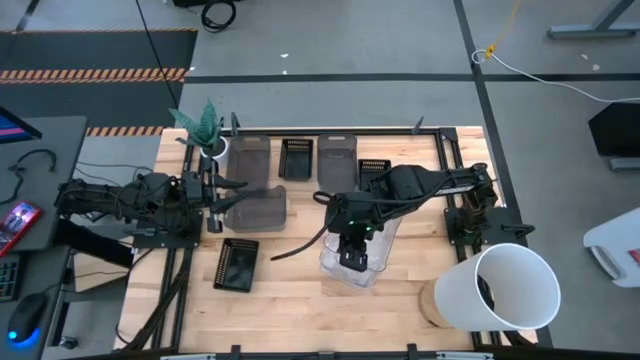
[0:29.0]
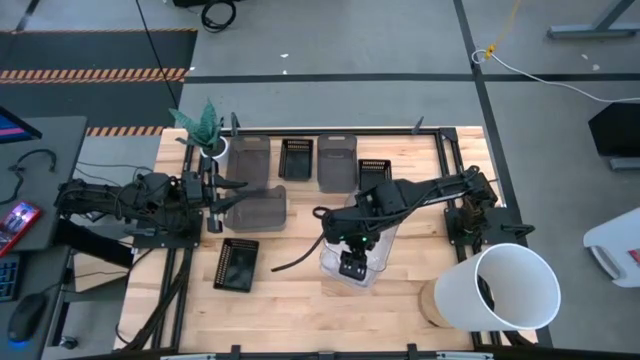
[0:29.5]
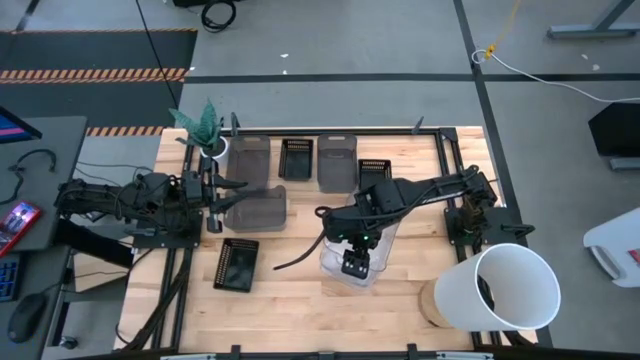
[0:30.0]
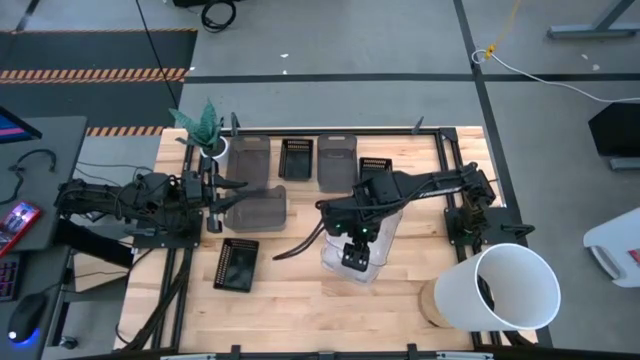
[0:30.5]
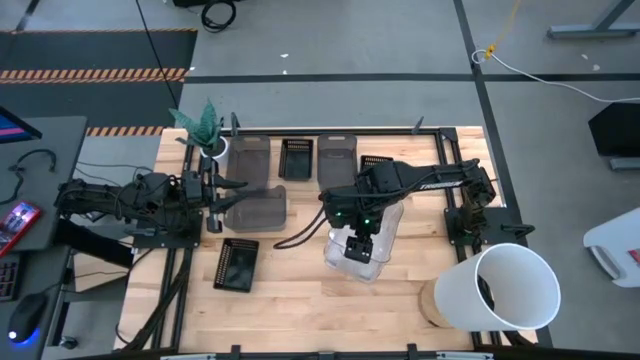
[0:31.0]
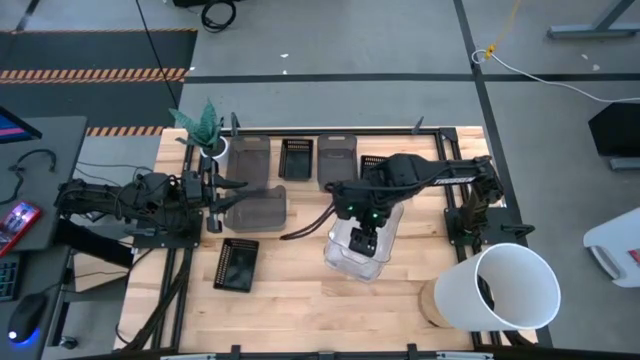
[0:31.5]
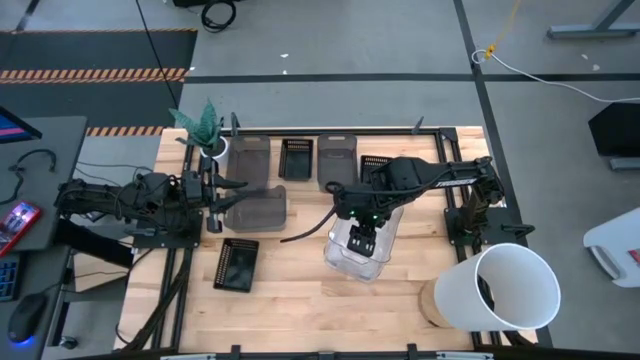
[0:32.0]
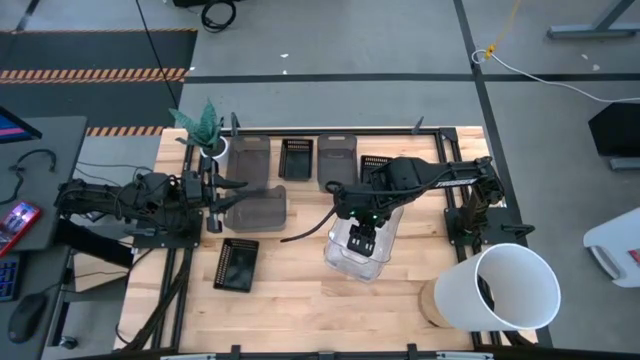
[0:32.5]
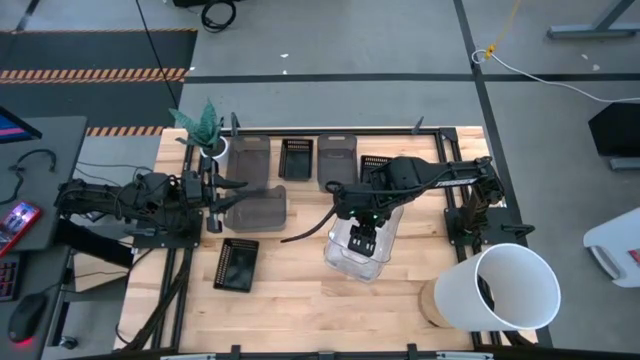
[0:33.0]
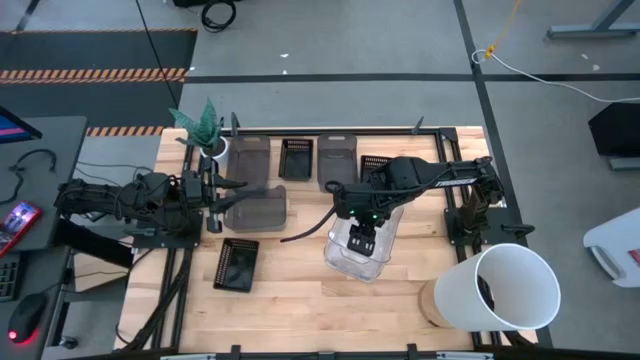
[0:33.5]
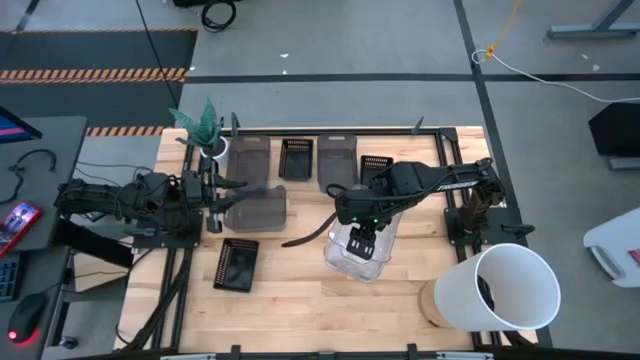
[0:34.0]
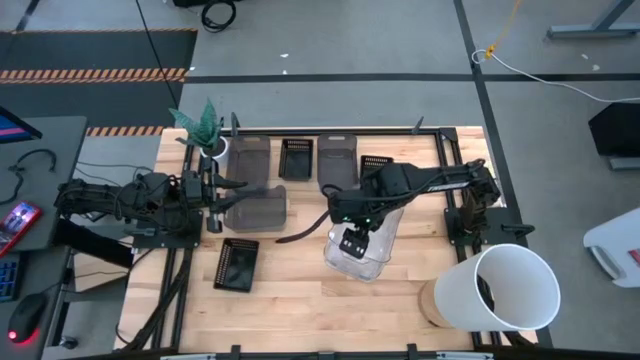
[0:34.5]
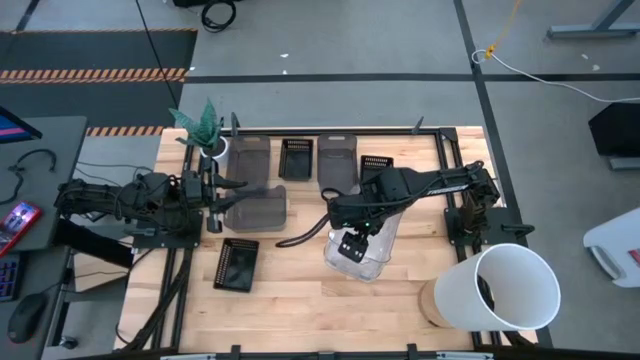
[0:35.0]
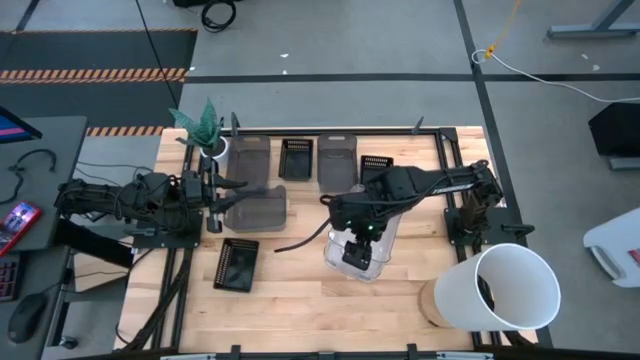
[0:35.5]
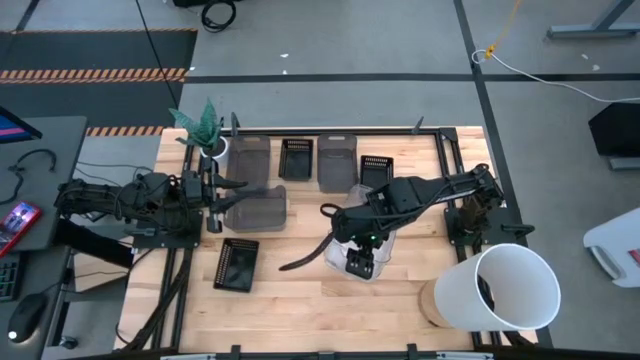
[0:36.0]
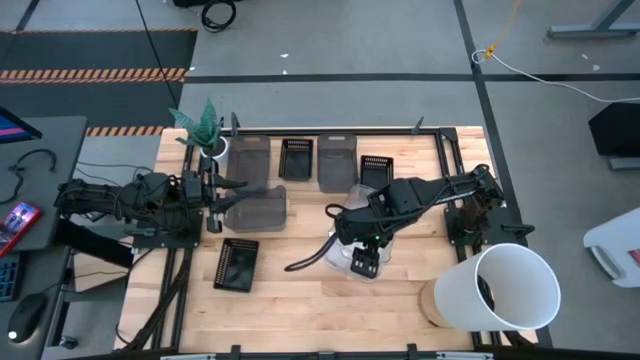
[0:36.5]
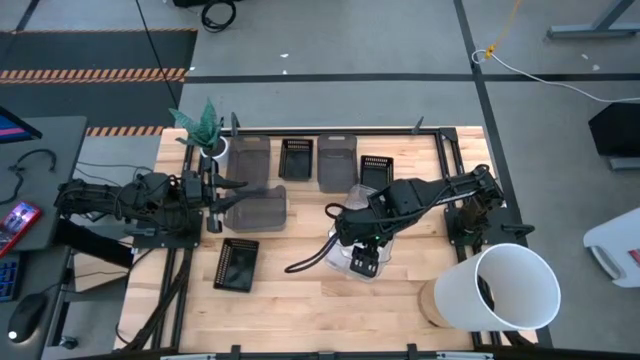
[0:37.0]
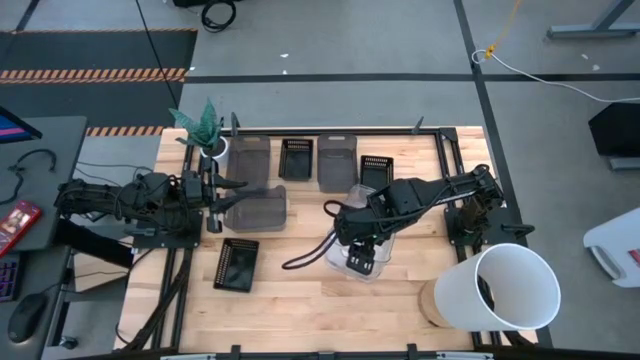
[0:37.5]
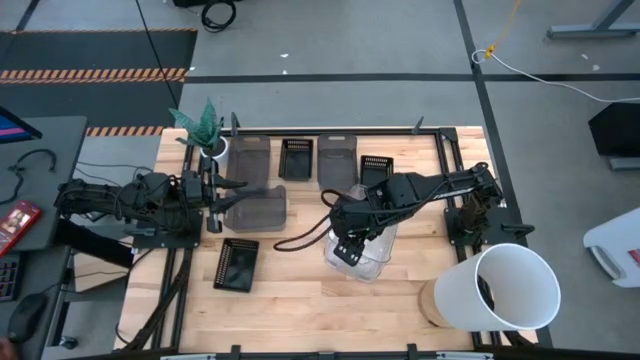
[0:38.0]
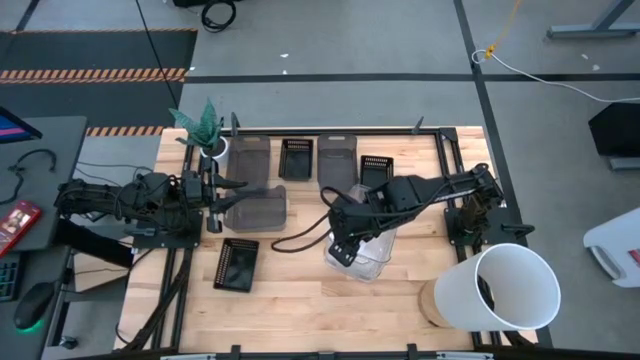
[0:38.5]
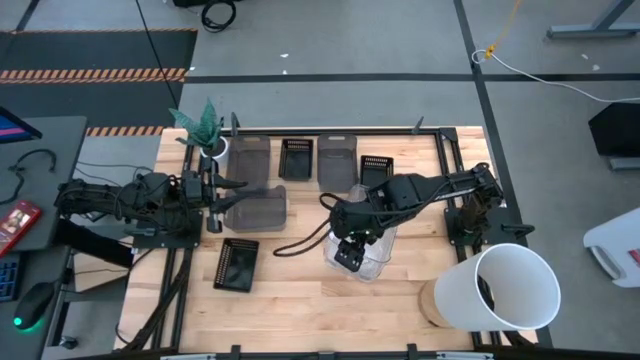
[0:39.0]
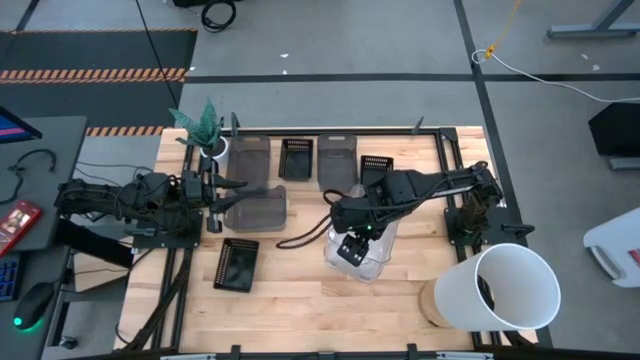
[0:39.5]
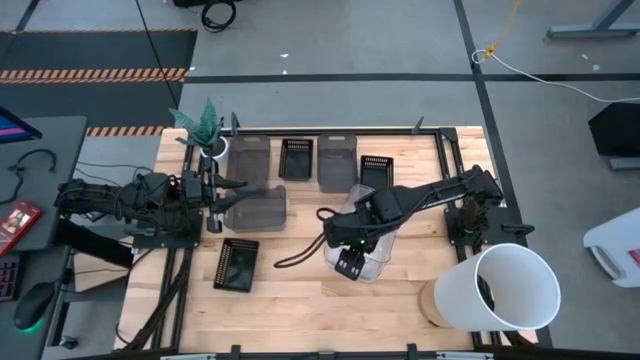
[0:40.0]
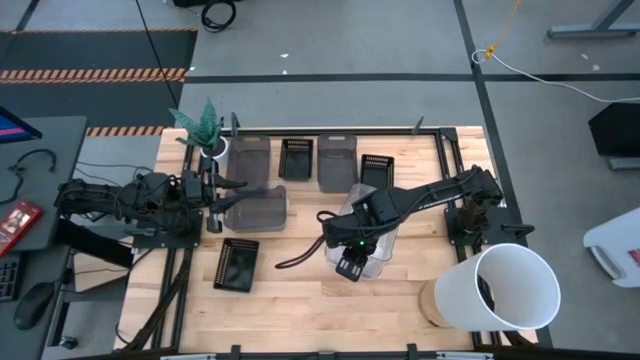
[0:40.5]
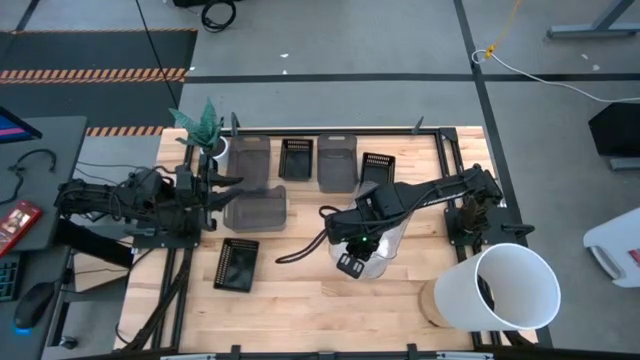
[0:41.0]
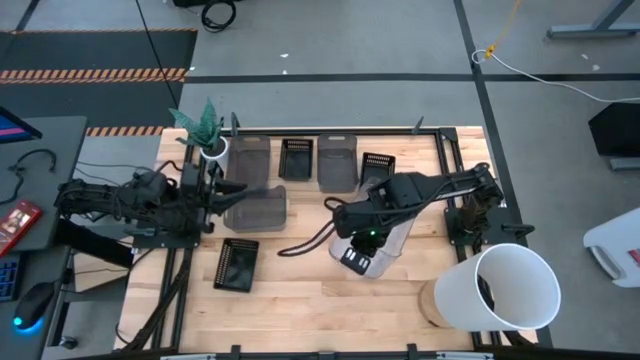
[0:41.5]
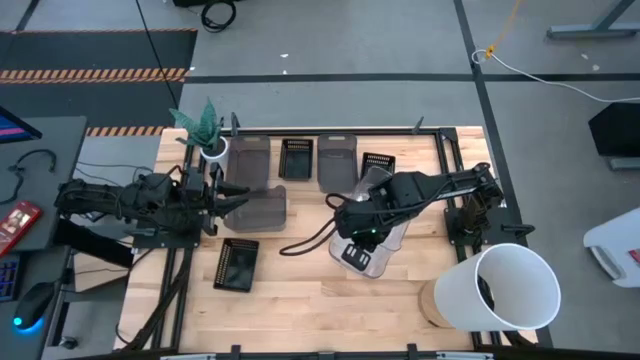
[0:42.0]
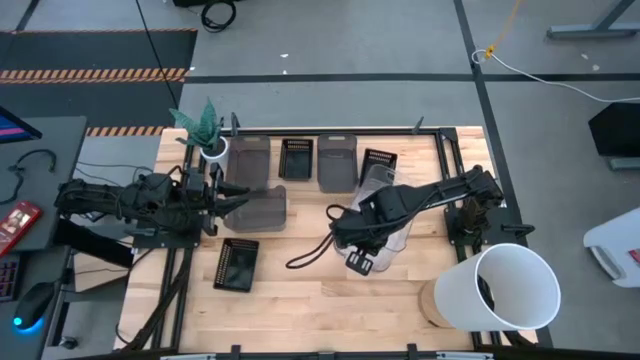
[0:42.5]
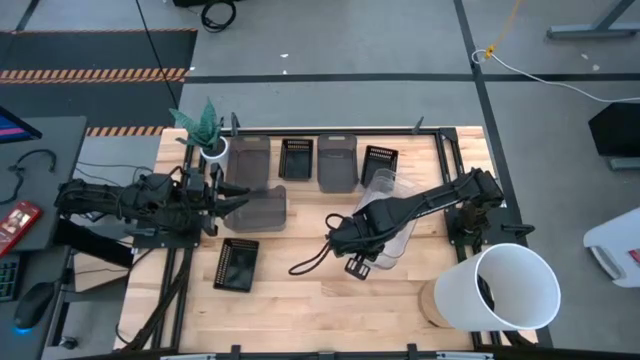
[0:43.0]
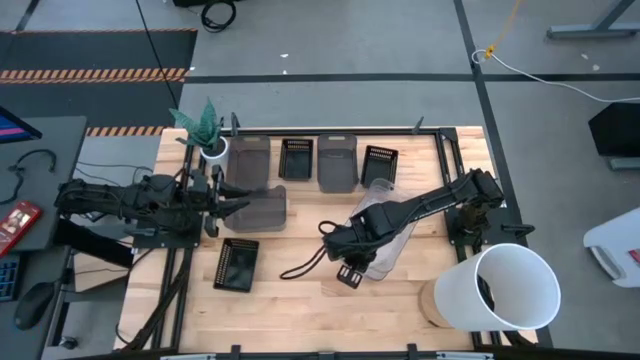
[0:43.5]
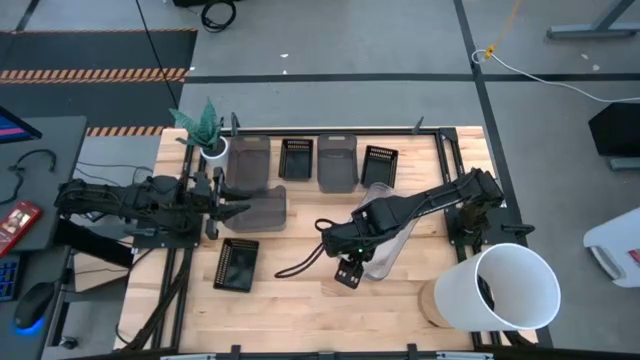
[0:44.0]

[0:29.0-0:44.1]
Stack the top transparent bin on the bottom stacked transparent bins

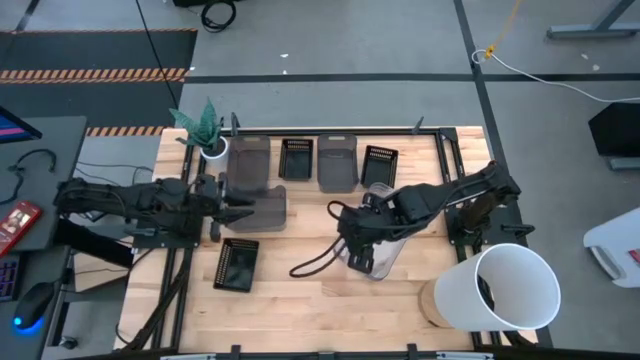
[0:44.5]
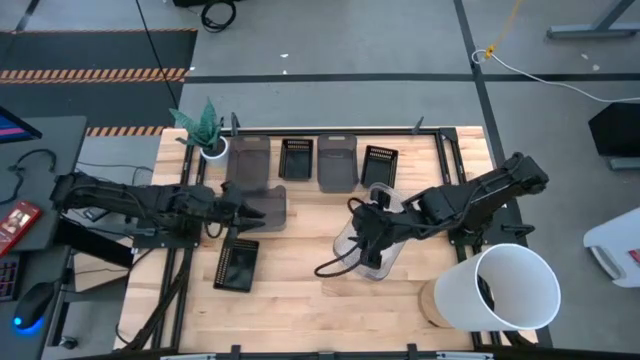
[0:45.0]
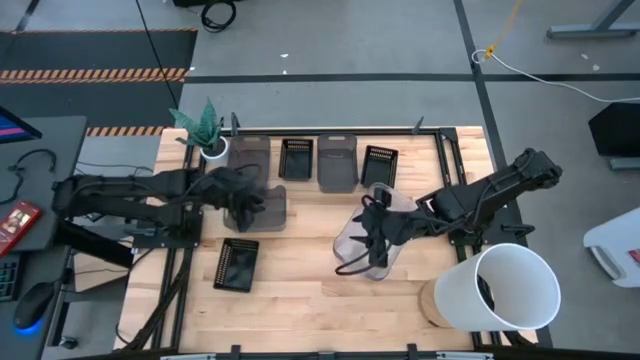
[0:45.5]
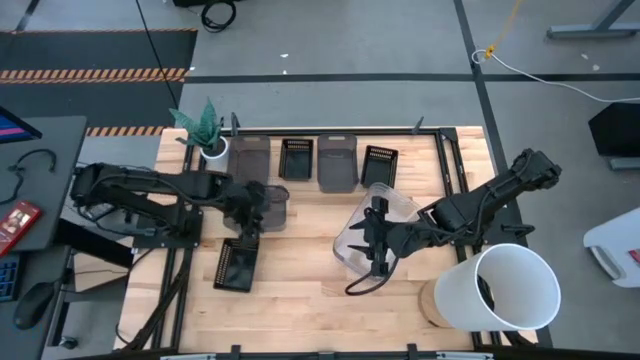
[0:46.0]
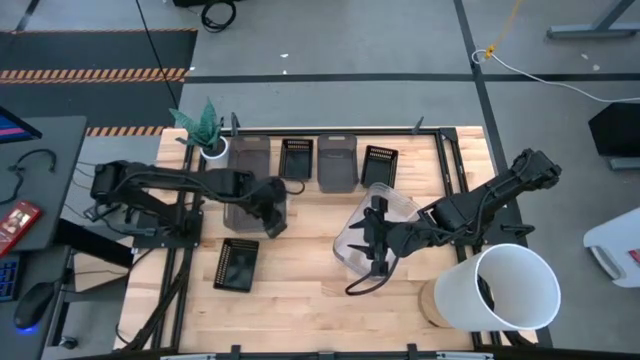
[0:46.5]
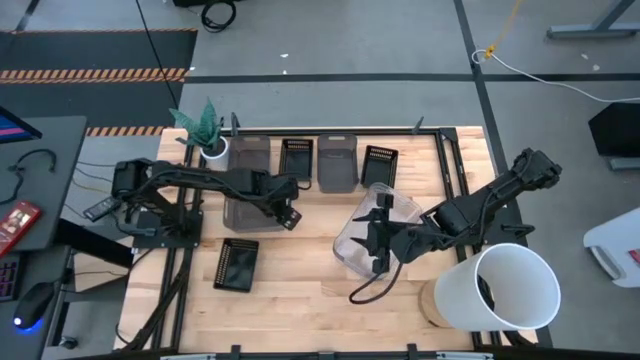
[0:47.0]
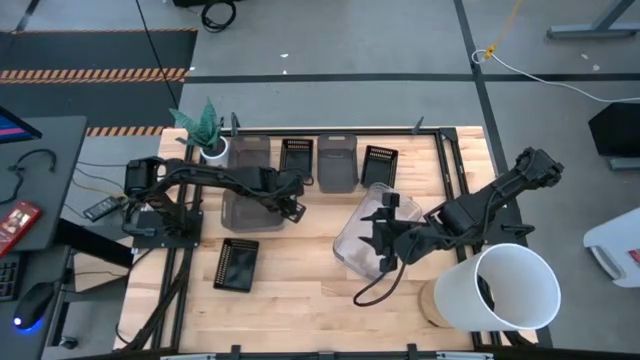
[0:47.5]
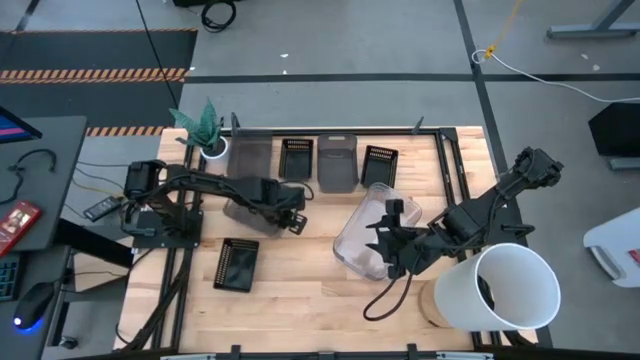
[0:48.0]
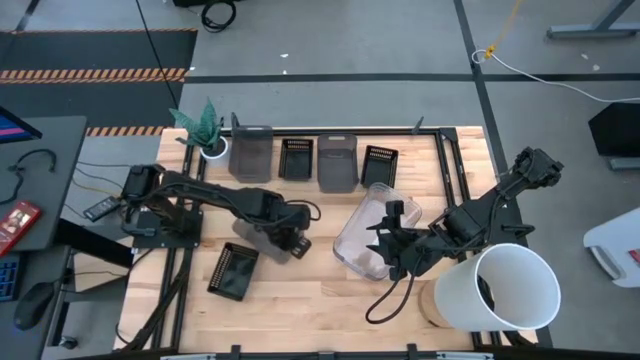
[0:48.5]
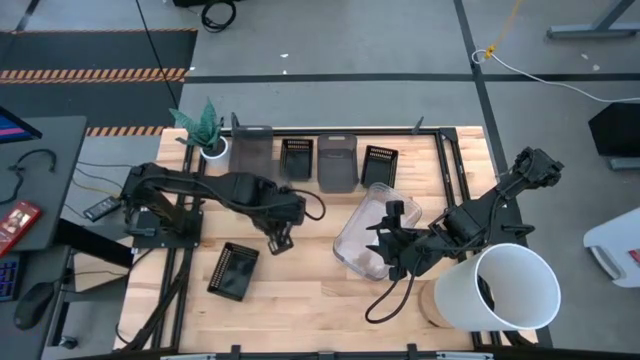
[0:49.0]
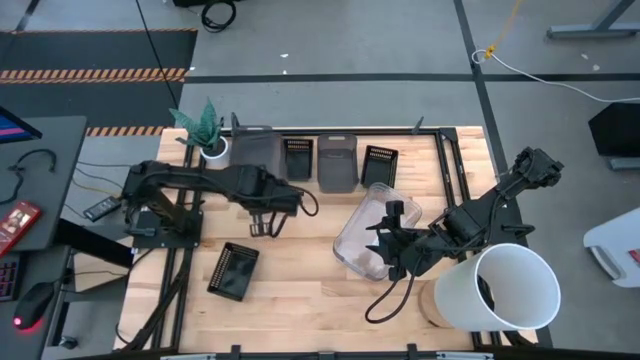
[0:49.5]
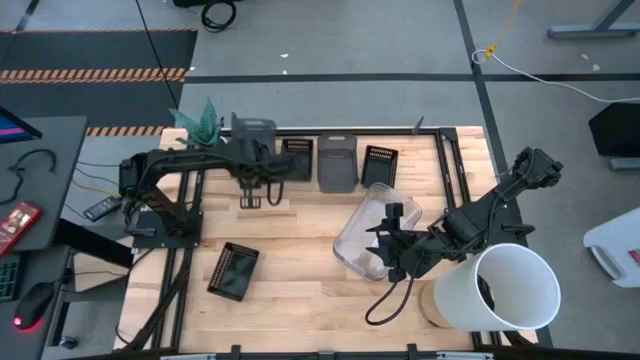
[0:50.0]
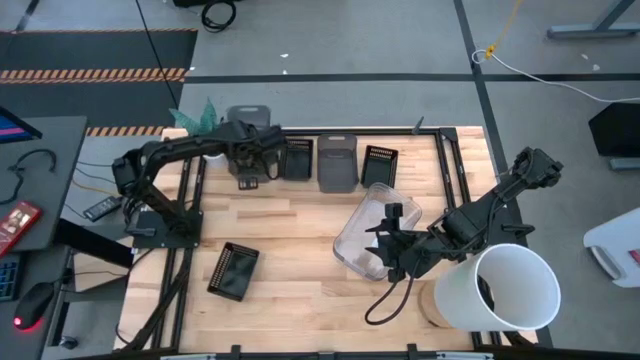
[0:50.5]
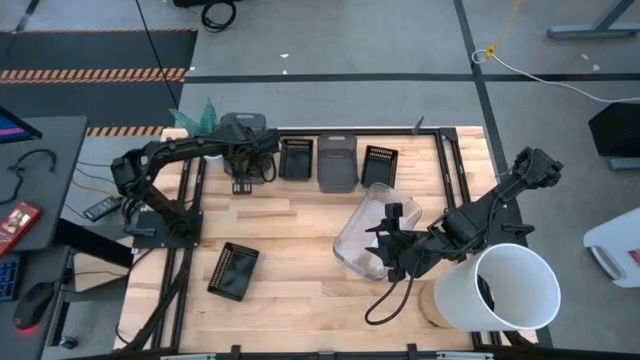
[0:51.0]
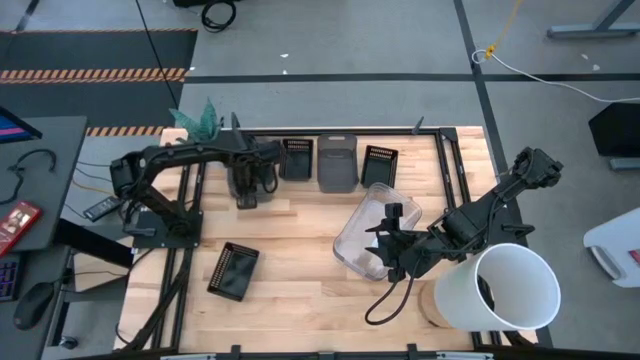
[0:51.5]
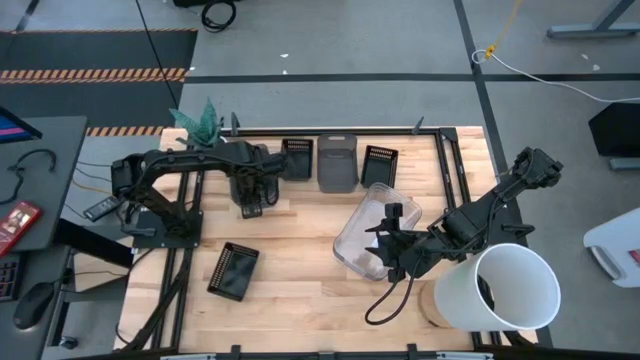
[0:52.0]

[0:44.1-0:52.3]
Stack the bottom gray bin on the top left gray bin
